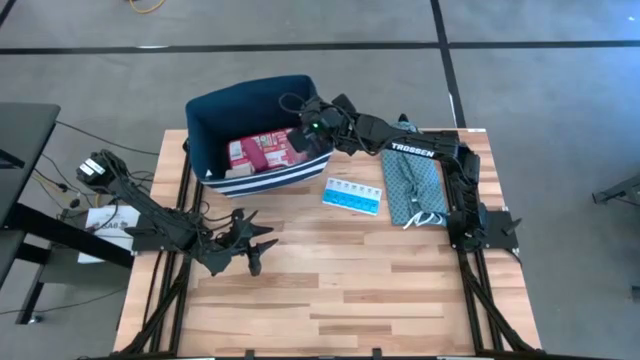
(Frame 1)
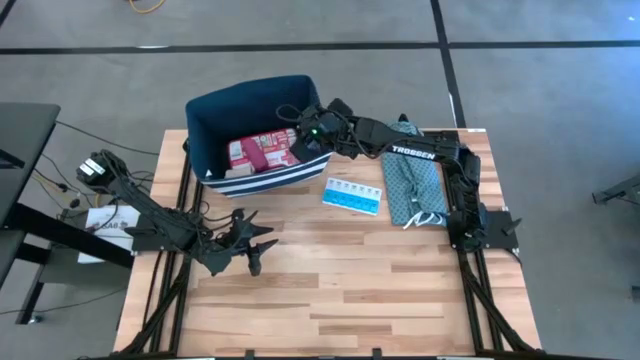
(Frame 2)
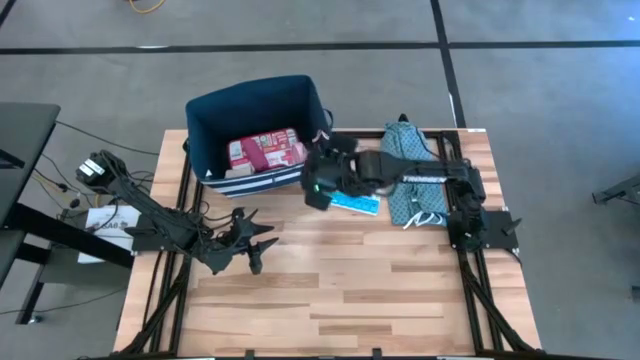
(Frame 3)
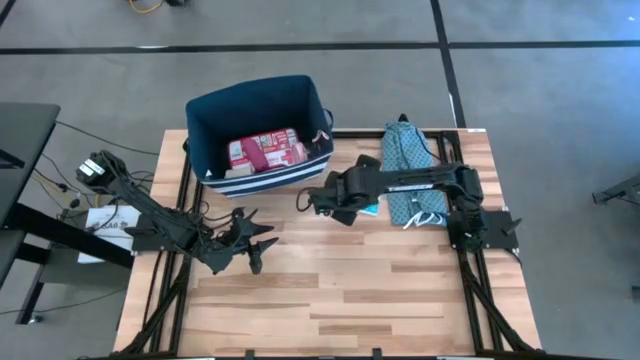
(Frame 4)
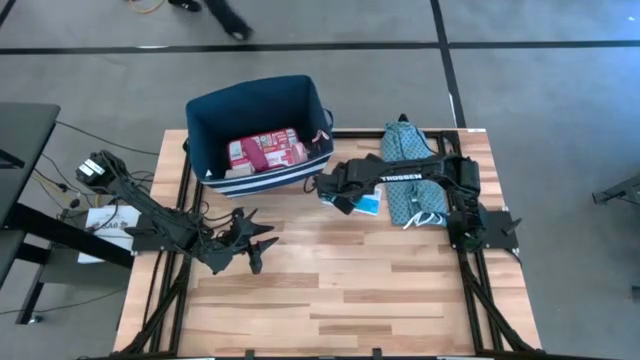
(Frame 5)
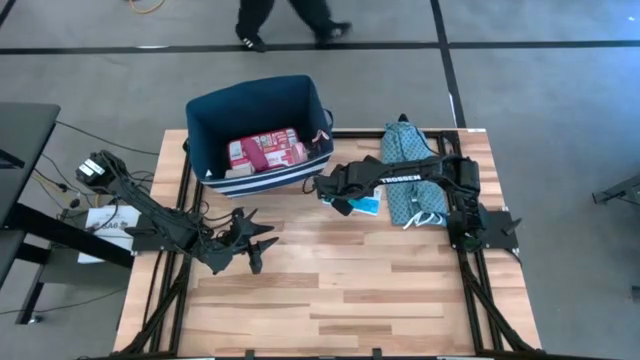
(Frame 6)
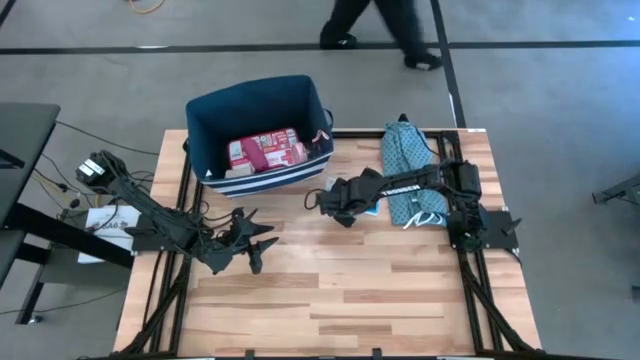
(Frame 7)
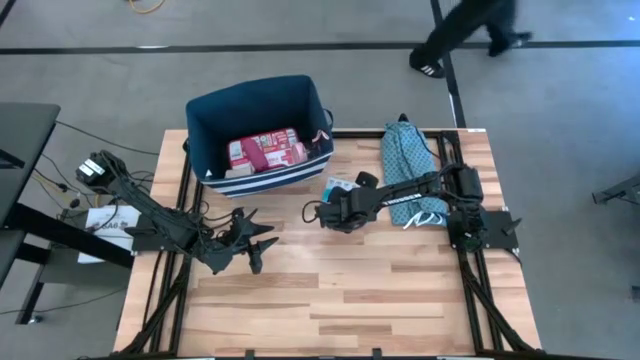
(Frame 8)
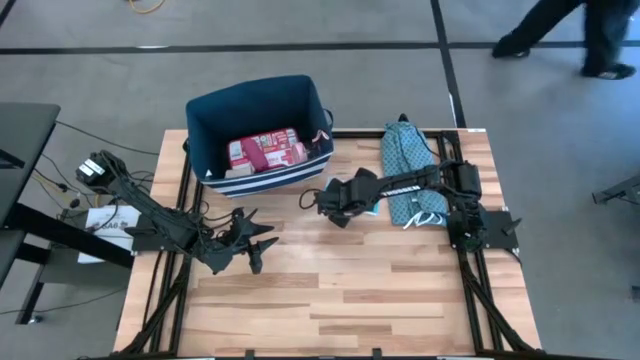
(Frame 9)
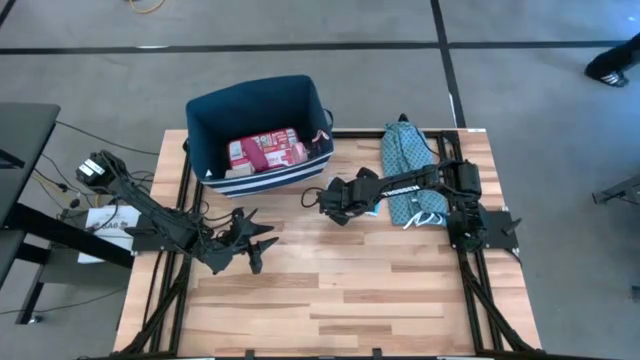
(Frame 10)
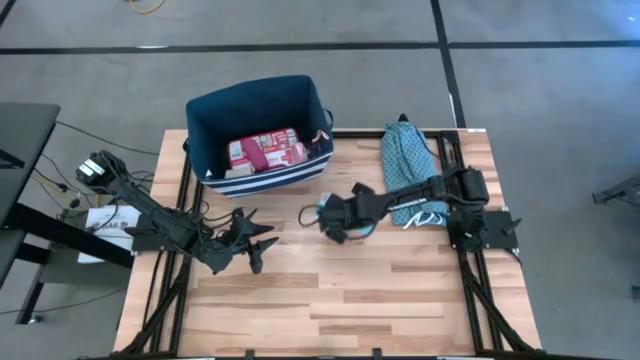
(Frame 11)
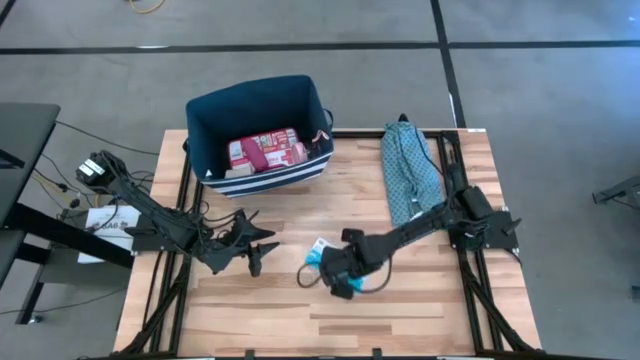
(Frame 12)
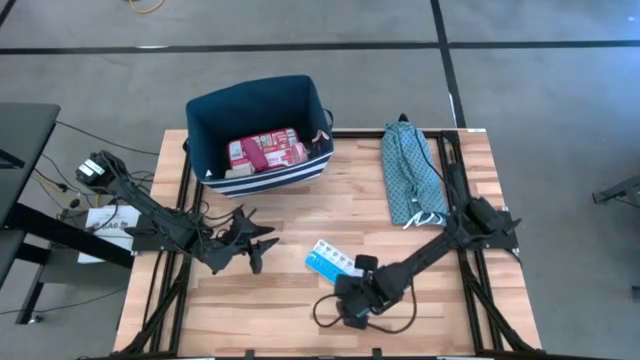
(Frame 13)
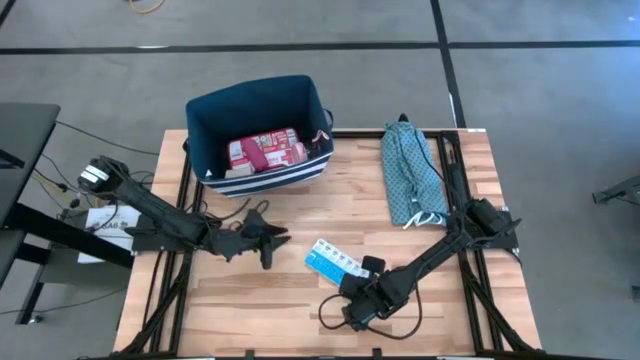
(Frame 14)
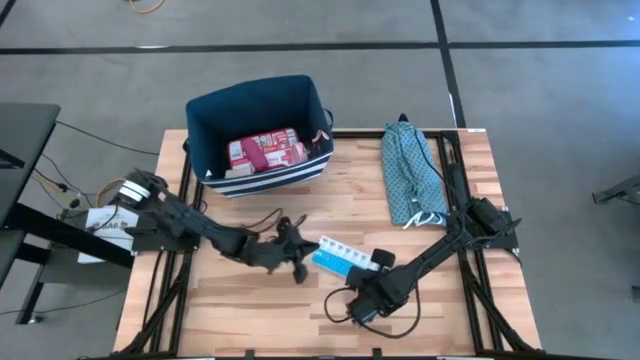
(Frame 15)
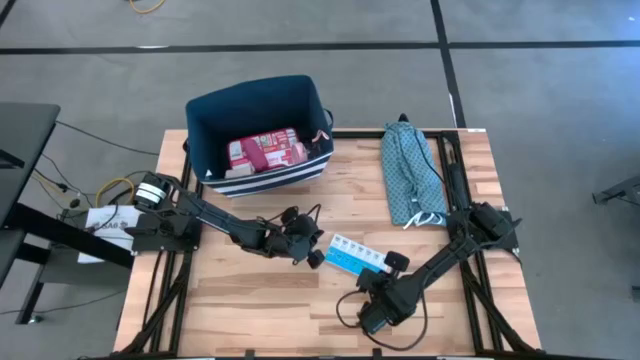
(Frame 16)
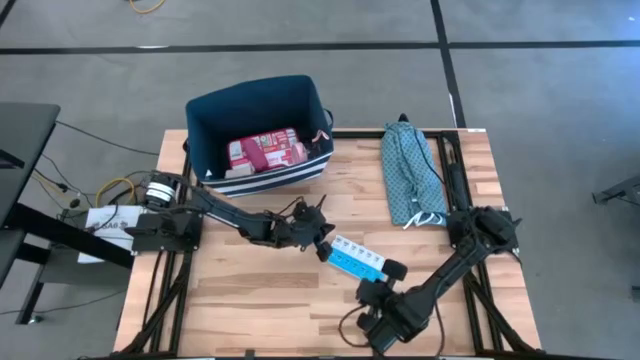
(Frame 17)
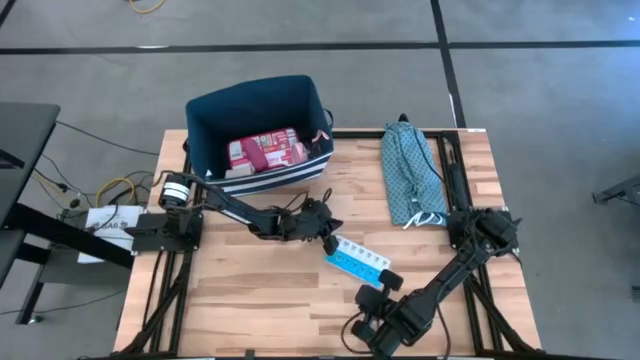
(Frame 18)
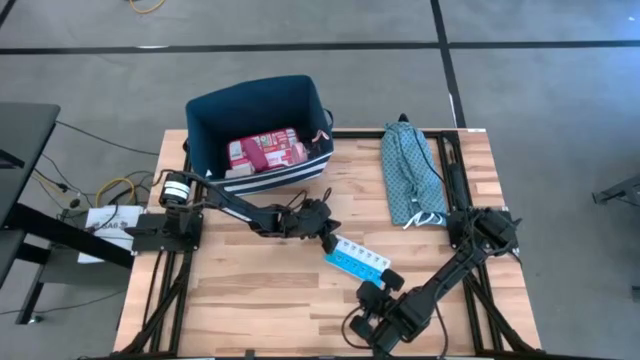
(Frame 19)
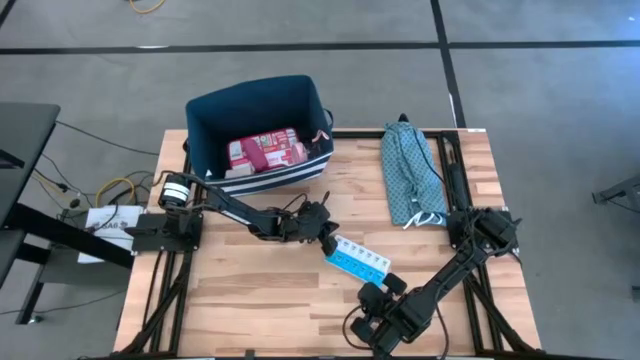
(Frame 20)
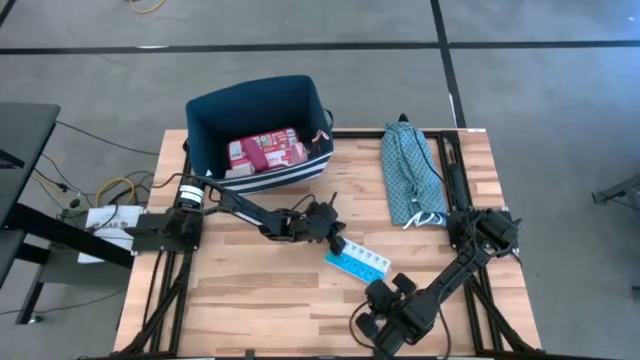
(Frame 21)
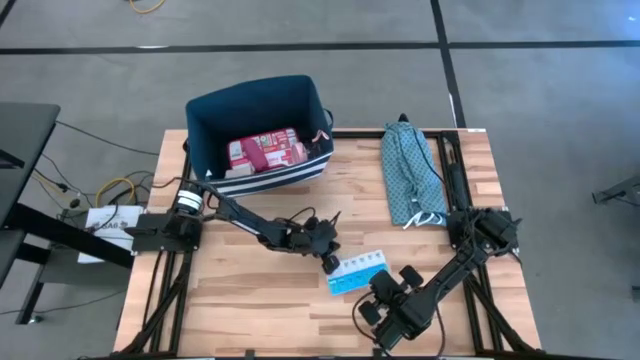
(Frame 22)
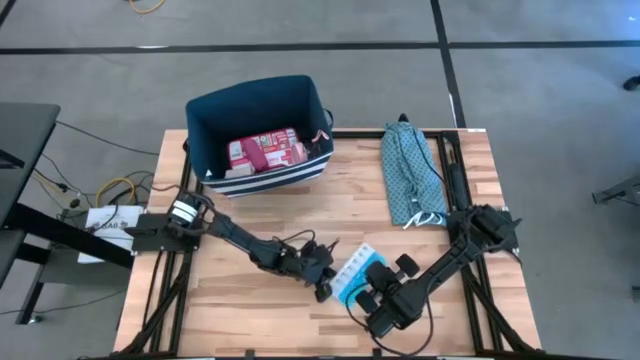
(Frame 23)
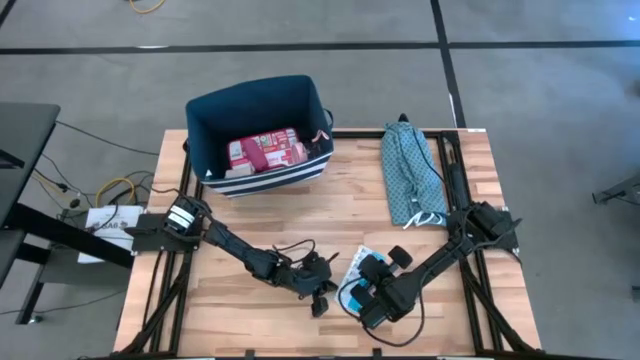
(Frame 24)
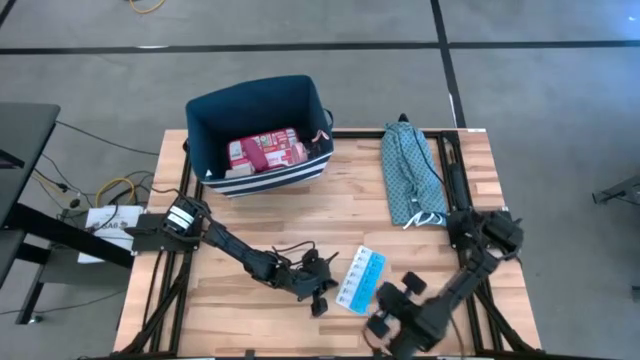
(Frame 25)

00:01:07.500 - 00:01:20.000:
Task: Pick & place medical supplies in basket/bin
Put the white pill organizer into the blue bin

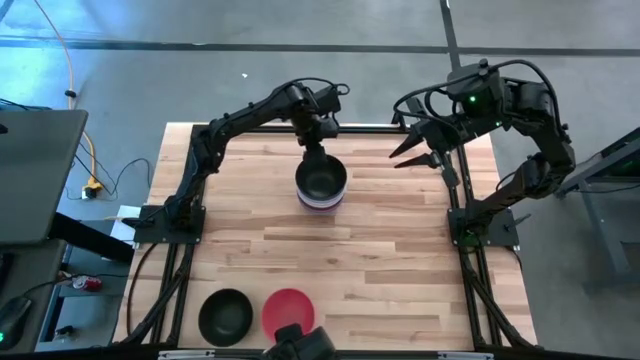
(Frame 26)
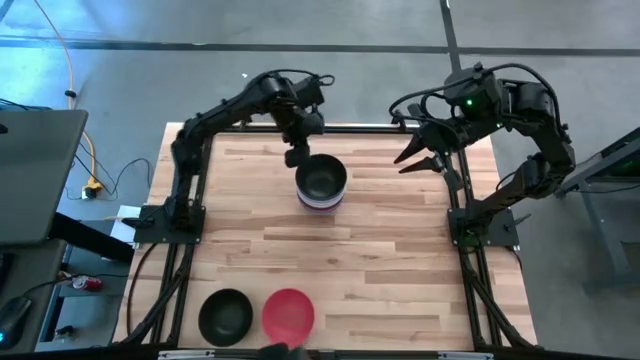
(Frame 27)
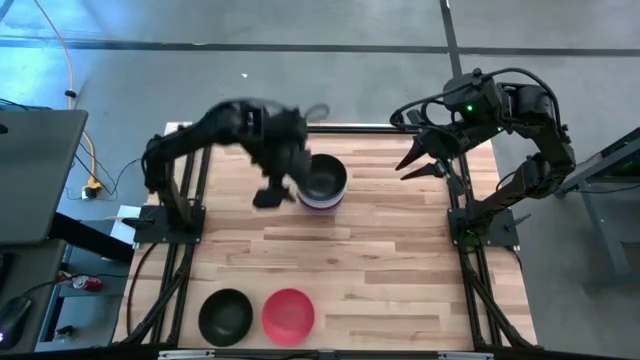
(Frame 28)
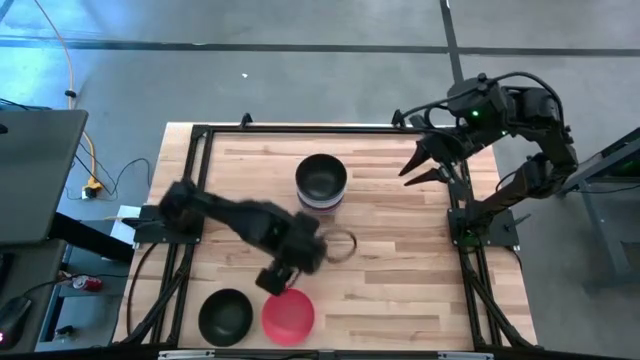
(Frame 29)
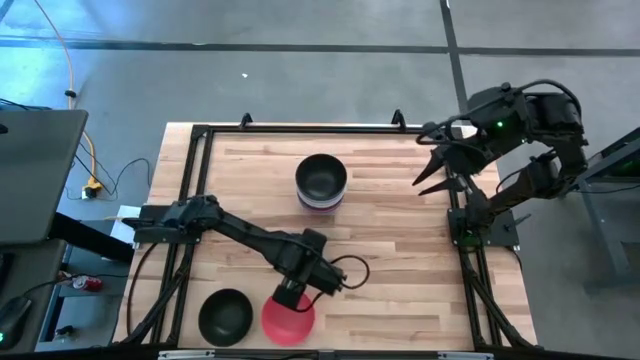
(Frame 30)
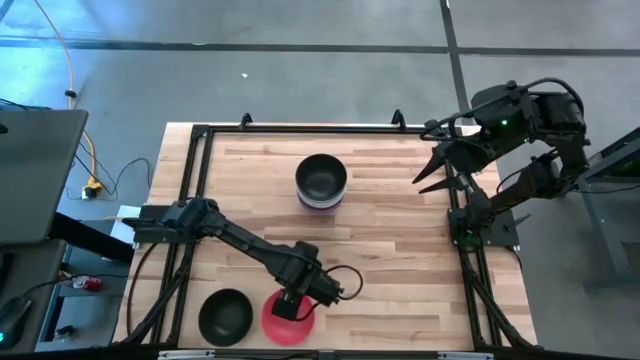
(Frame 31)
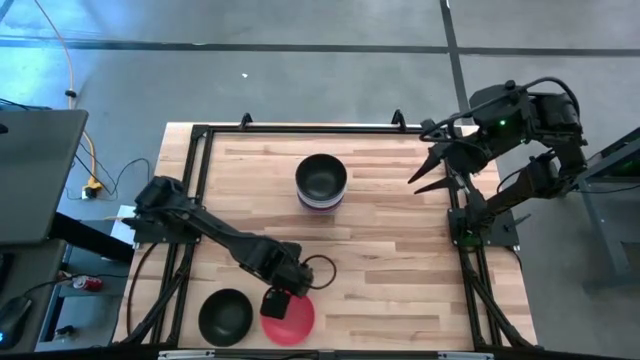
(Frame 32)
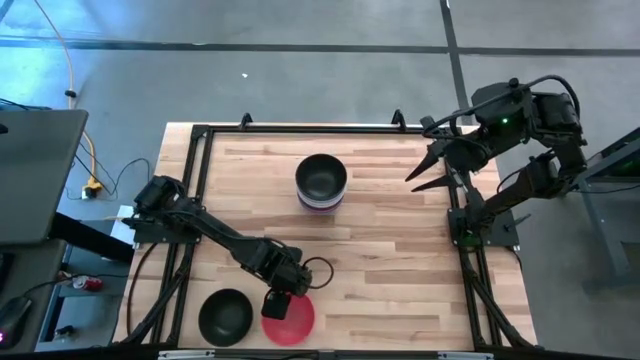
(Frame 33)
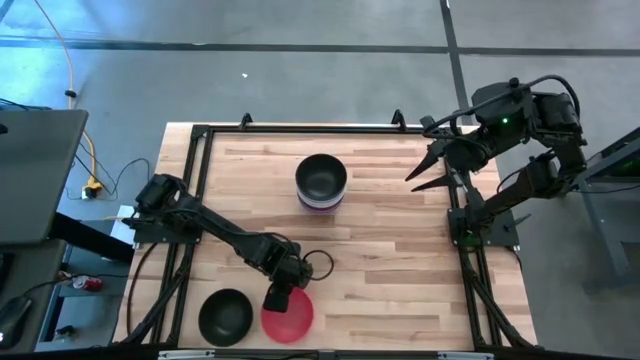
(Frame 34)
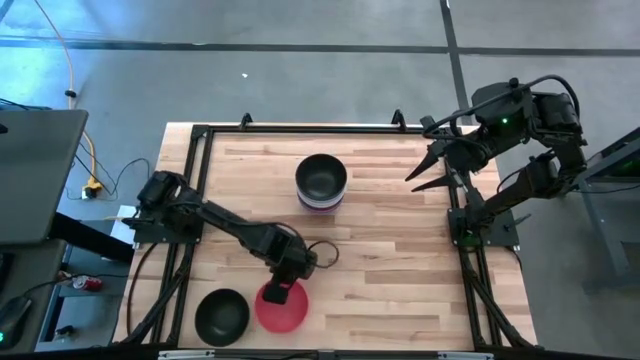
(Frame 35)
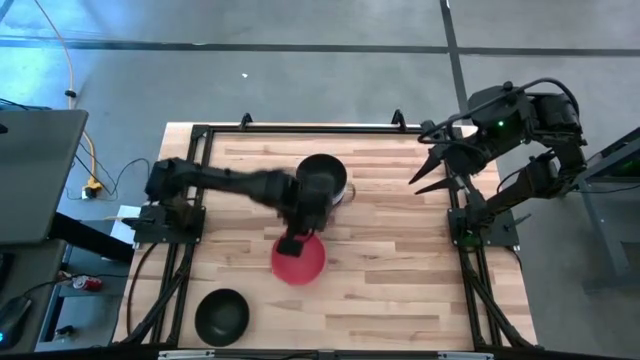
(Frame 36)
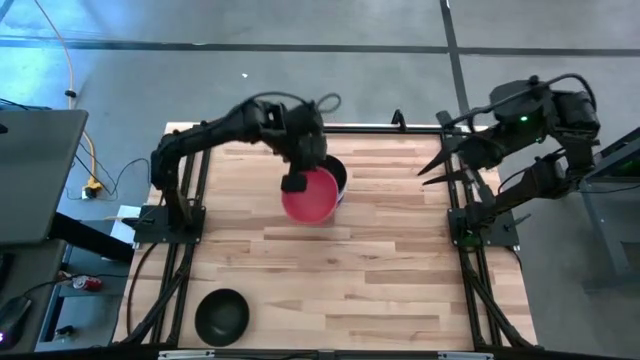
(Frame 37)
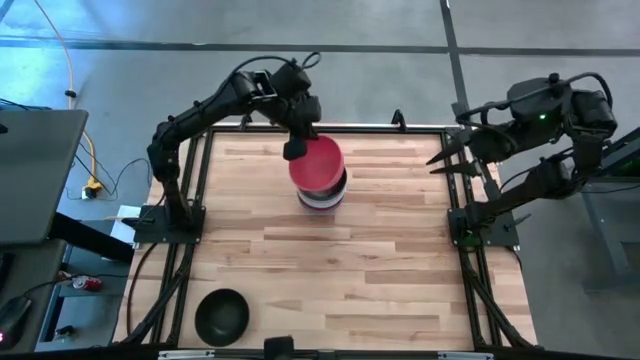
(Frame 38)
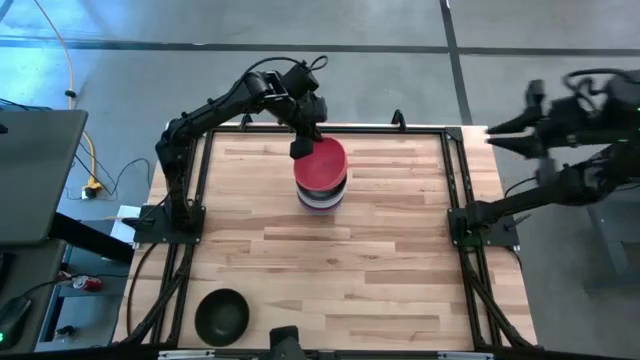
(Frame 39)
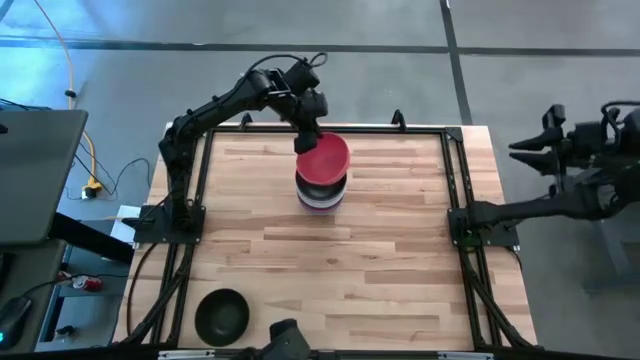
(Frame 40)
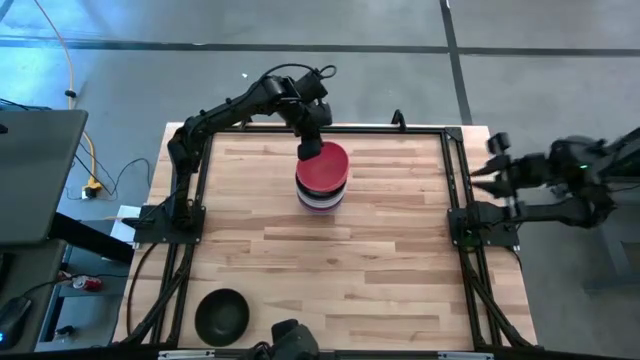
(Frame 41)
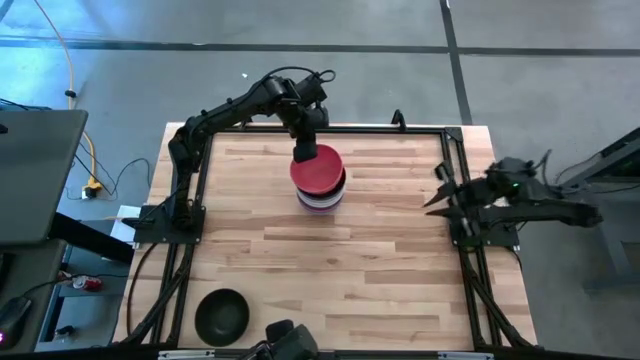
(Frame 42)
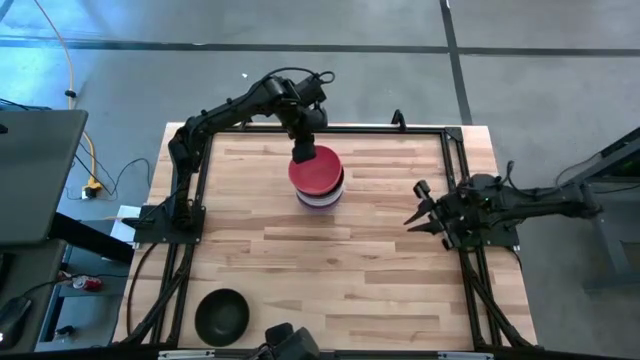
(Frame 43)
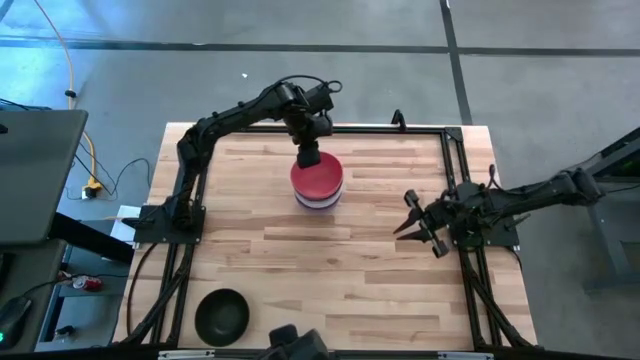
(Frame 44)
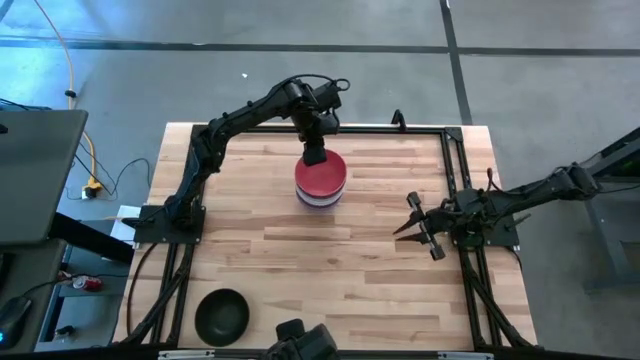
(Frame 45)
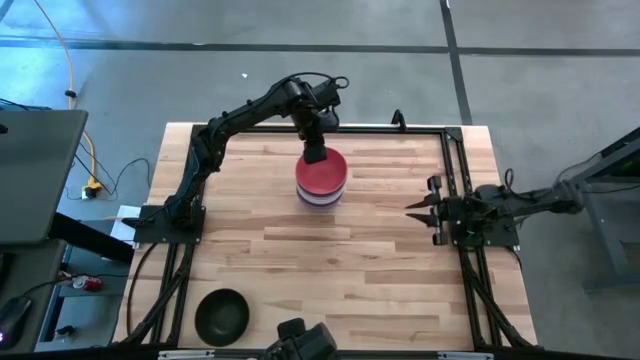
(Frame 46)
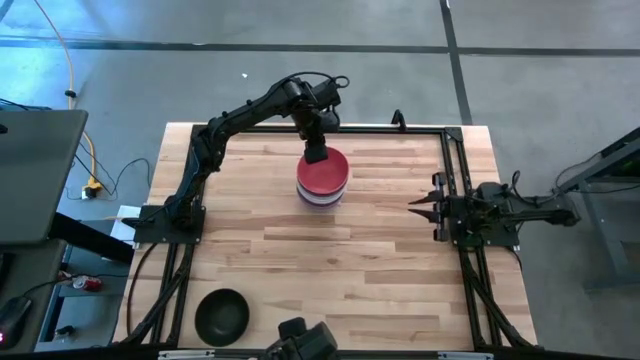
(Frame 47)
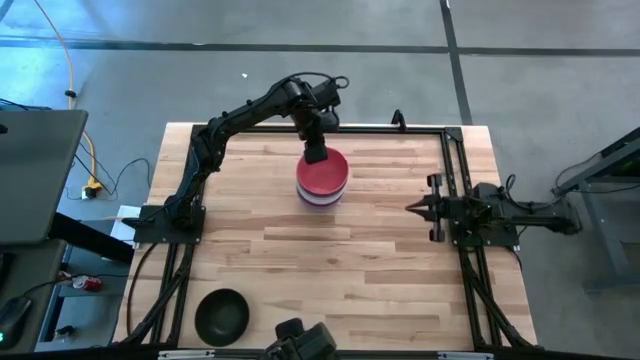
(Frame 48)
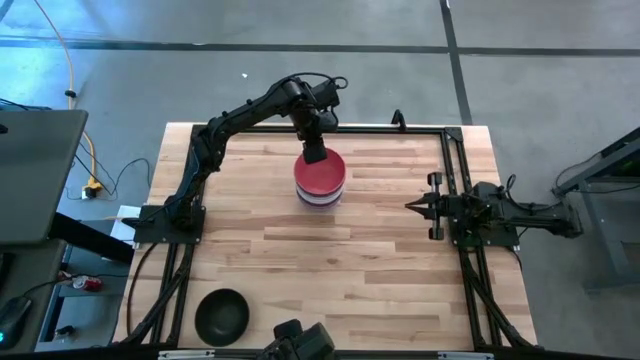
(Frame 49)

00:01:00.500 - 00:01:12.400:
Task: Nest bowls inside each other
Stack the orange bowl on top of the top black bowl
